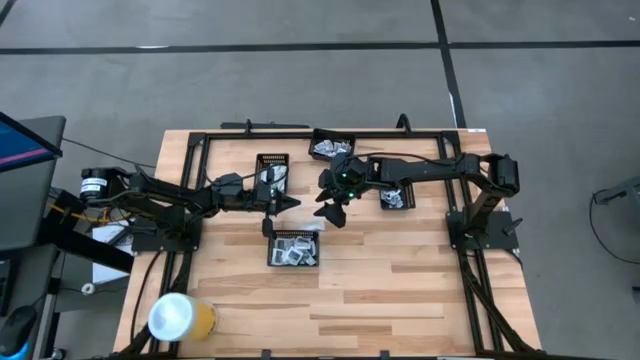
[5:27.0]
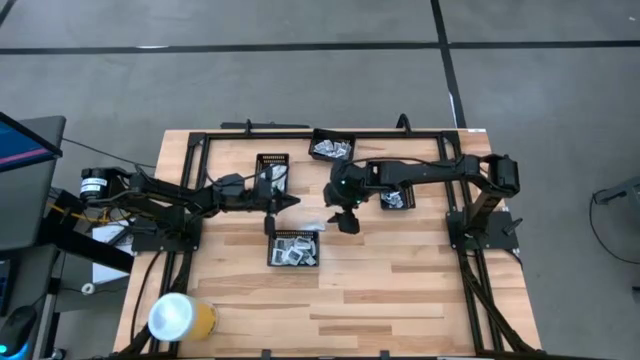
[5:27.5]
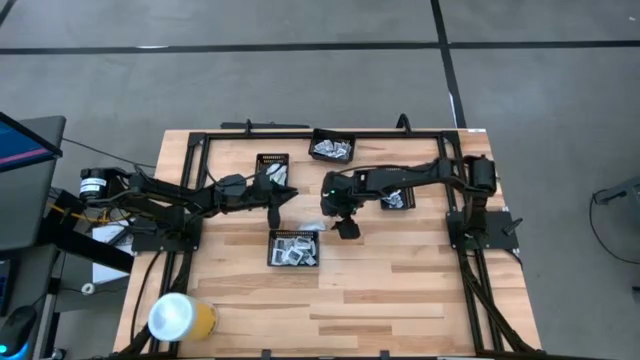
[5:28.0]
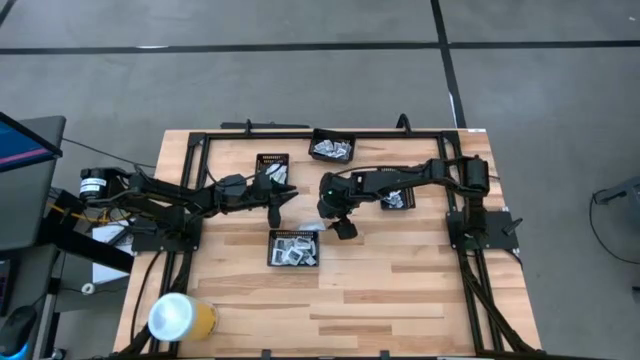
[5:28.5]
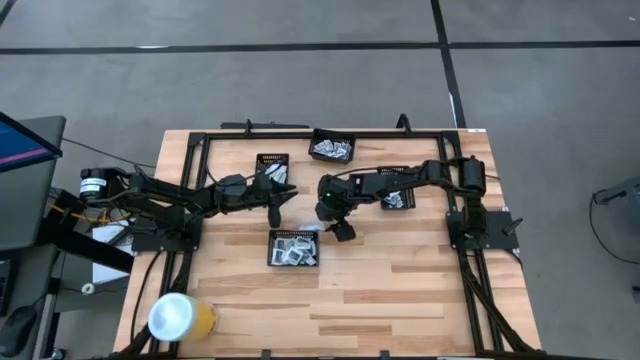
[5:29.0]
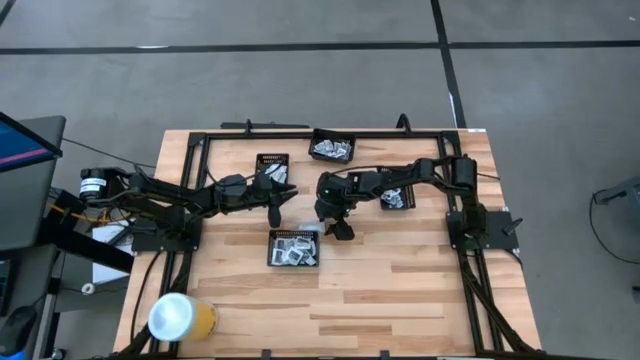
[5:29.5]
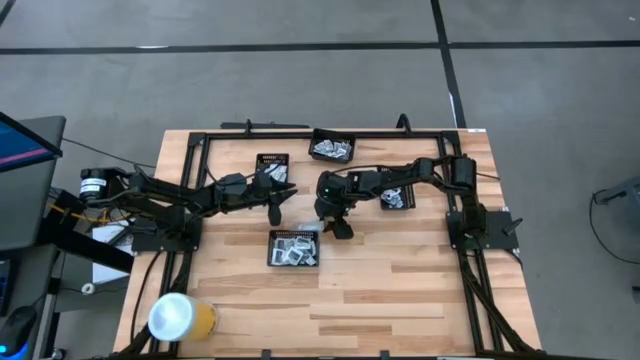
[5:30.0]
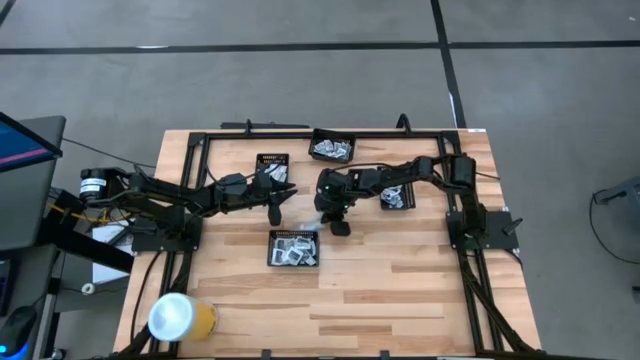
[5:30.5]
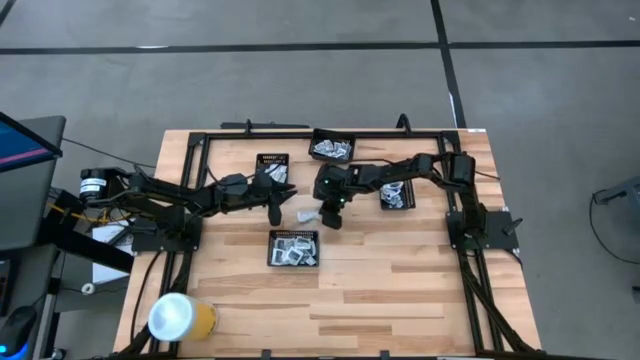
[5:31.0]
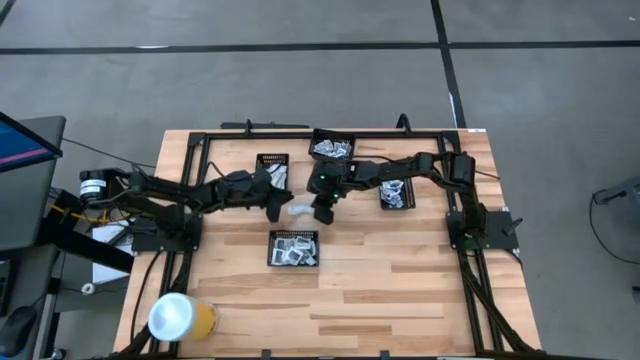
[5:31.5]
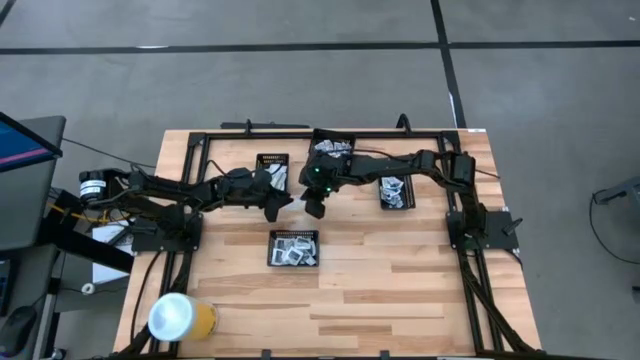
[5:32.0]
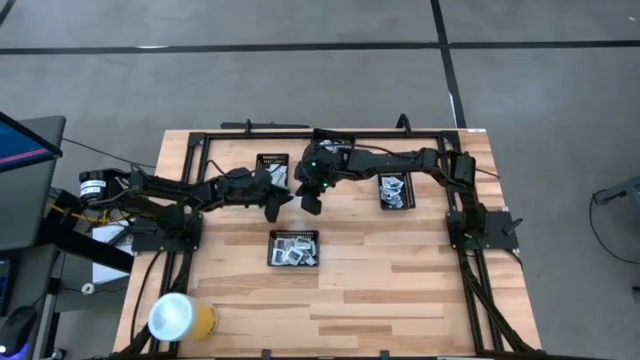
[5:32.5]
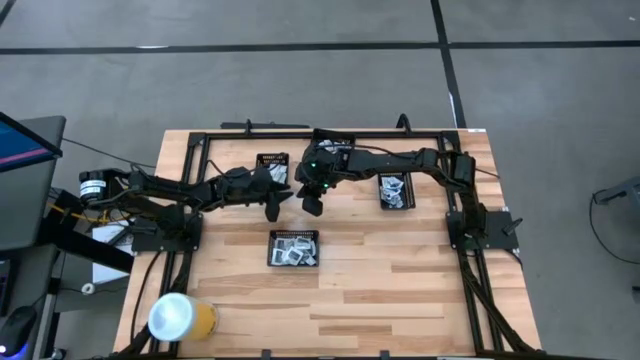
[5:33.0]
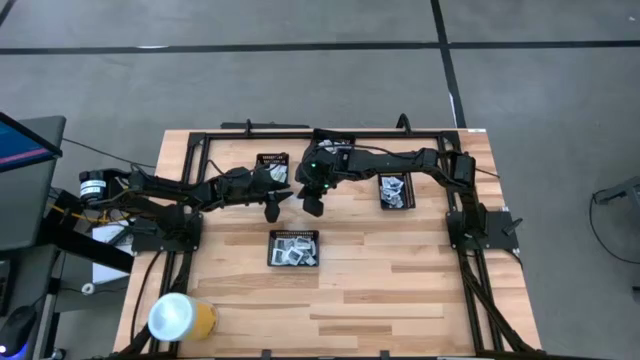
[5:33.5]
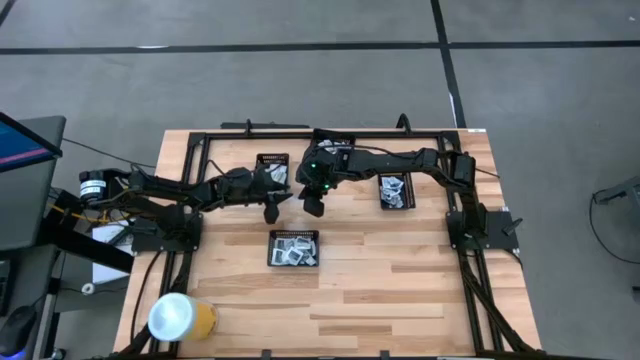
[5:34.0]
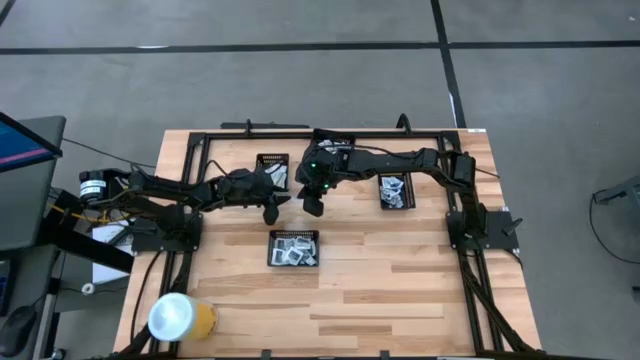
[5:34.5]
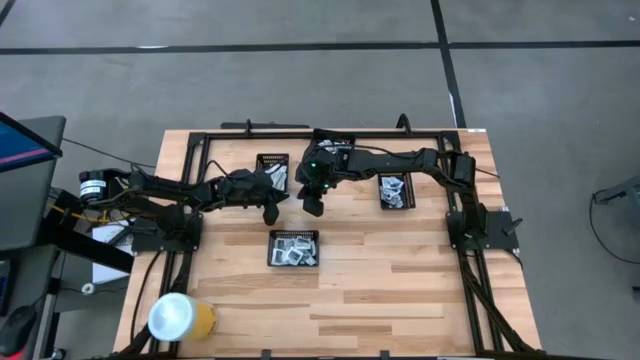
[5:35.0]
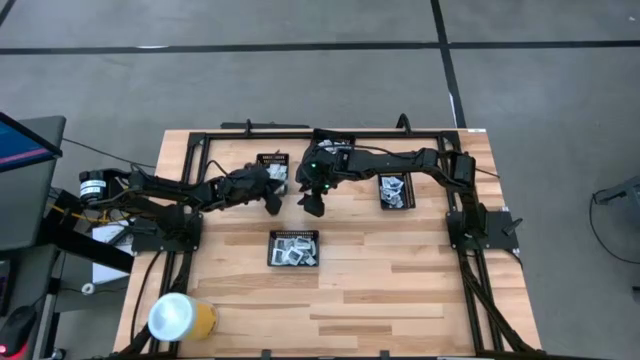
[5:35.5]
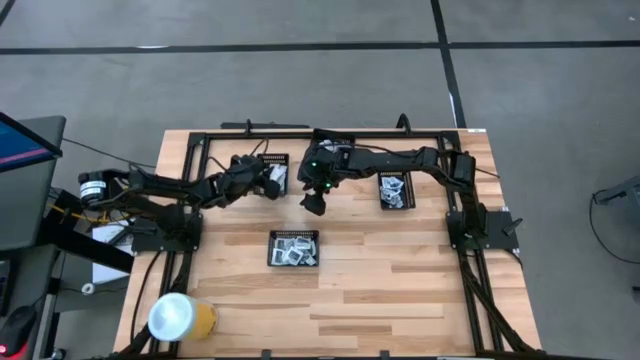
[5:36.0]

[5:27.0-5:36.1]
Task: Pick & Place First Aid Supplies
Put the green bandage into the left black bin

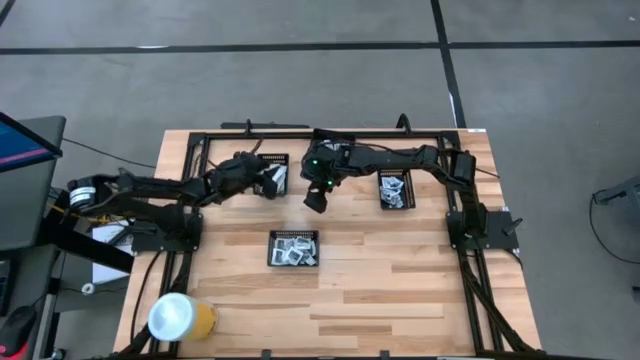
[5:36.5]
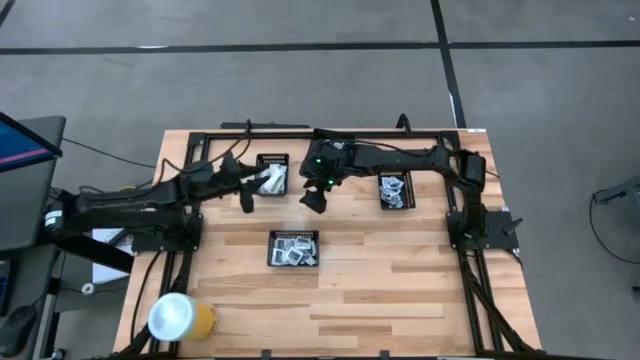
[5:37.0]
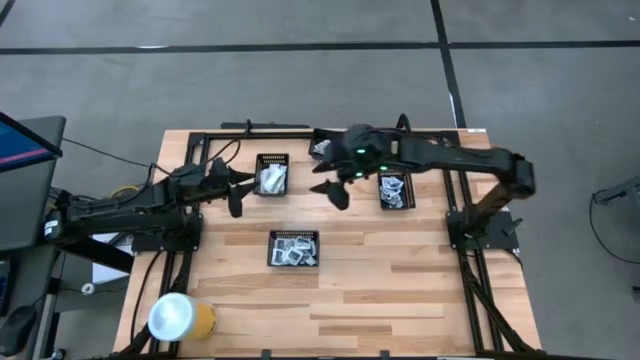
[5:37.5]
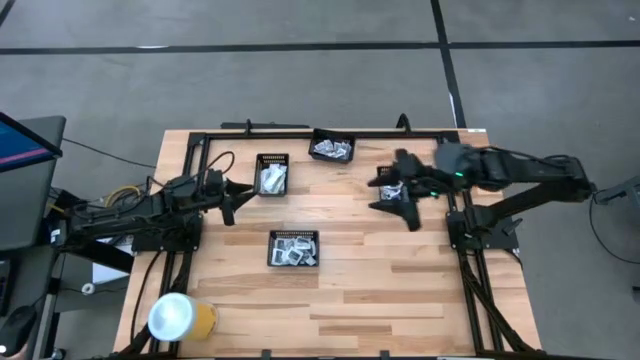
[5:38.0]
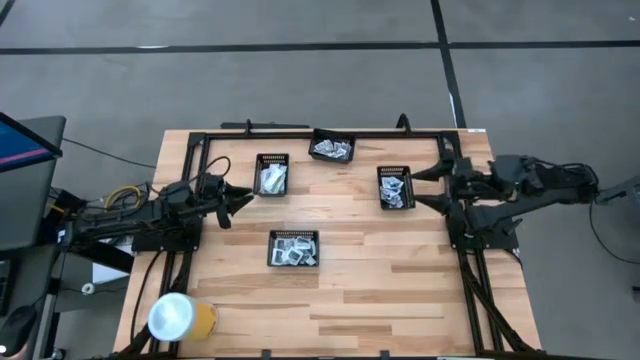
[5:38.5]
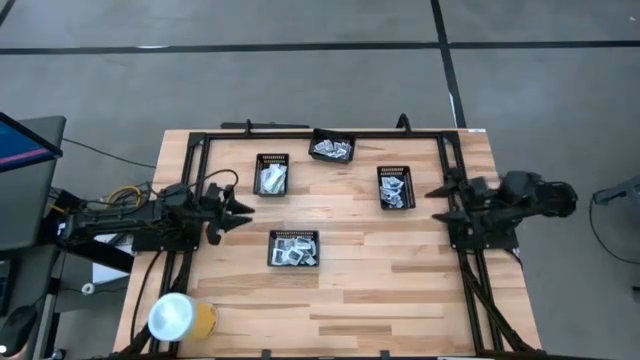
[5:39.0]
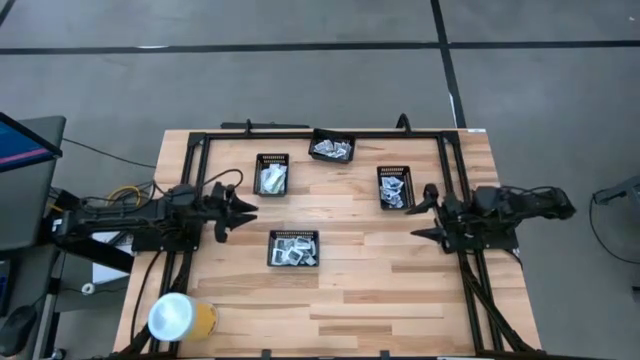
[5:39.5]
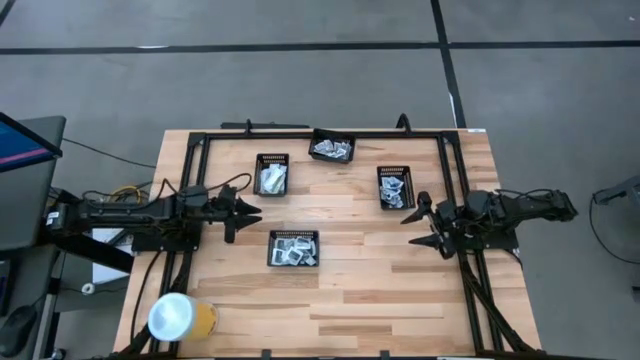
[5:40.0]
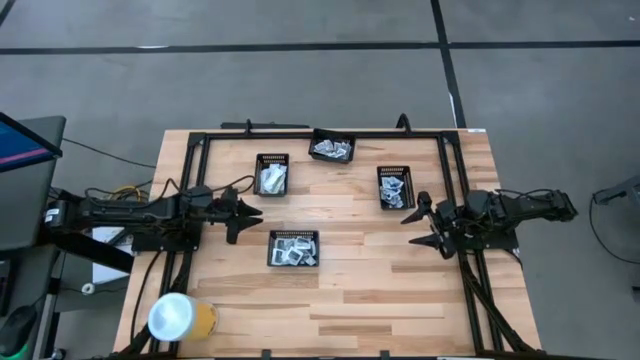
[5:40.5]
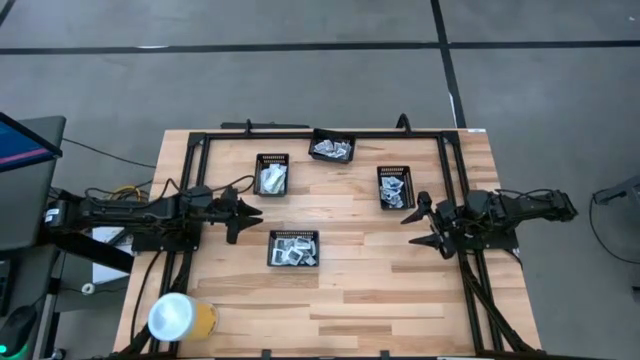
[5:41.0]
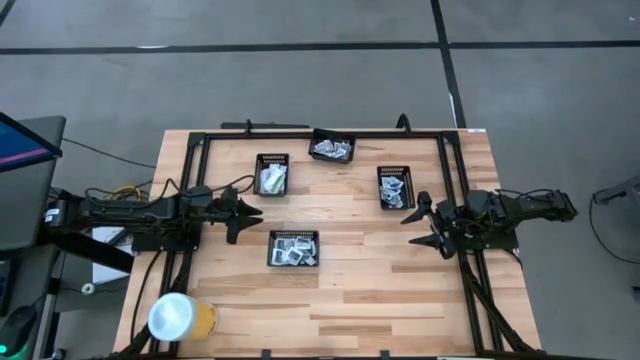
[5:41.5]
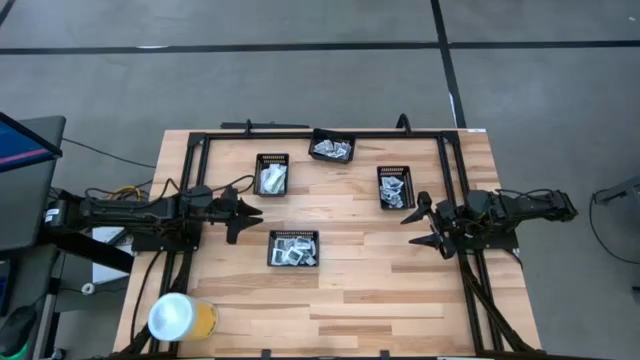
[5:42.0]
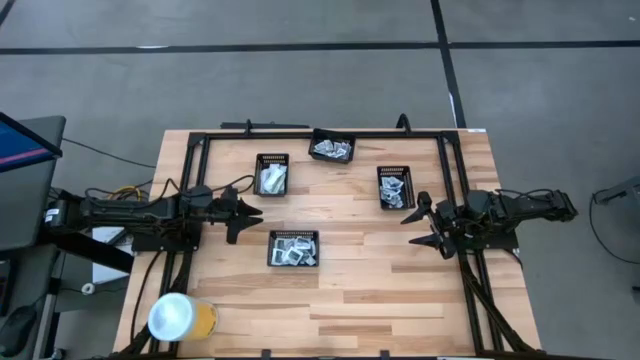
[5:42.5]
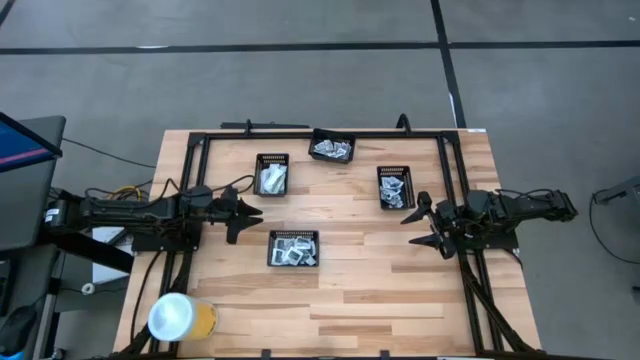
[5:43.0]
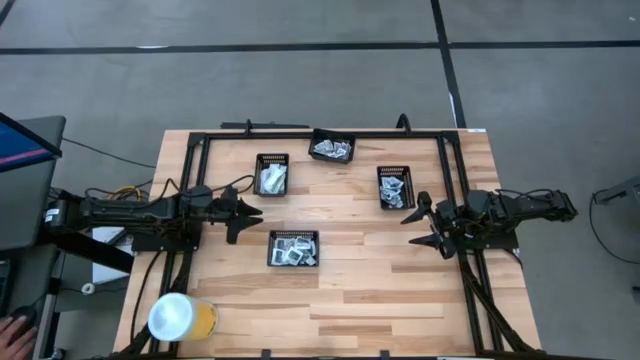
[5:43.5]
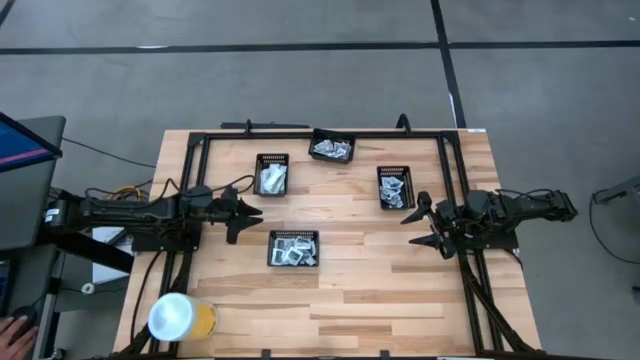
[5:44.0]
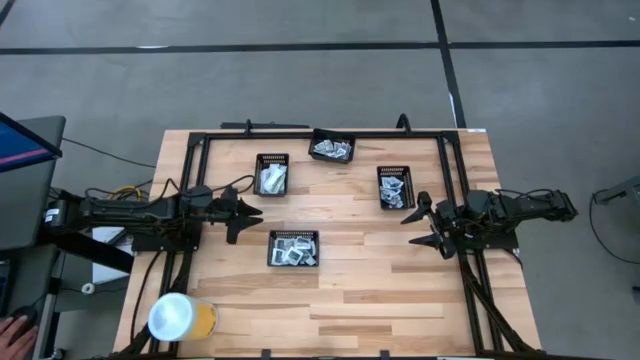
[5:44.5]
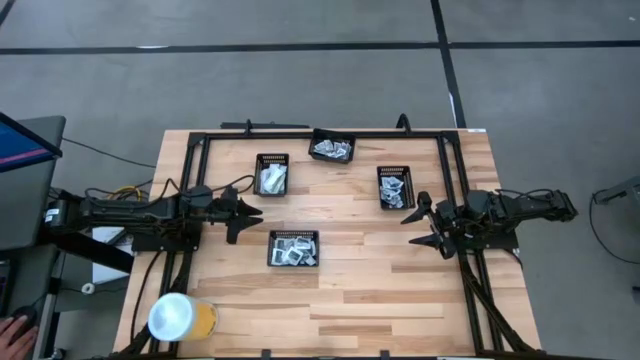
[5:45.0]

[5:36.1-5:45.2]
Return to Home Position
